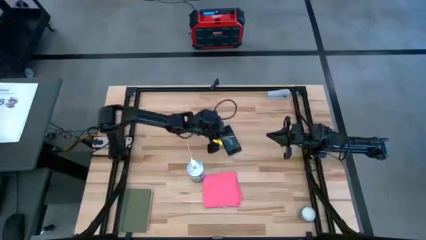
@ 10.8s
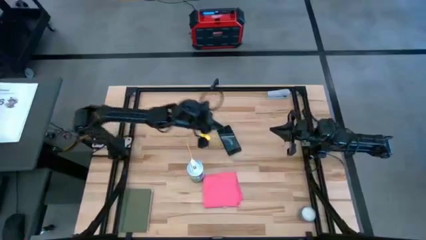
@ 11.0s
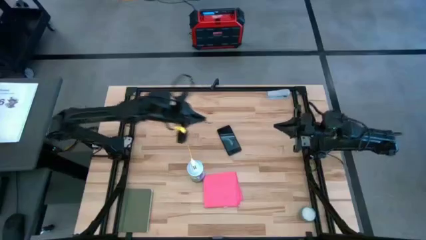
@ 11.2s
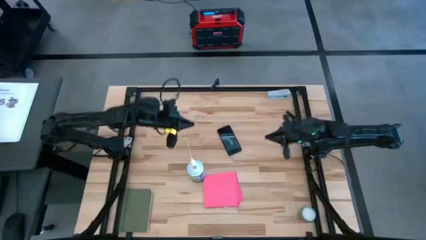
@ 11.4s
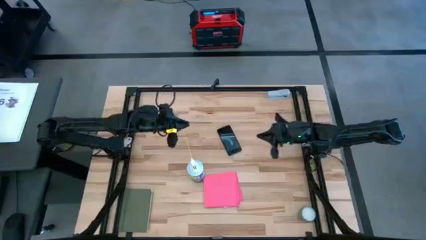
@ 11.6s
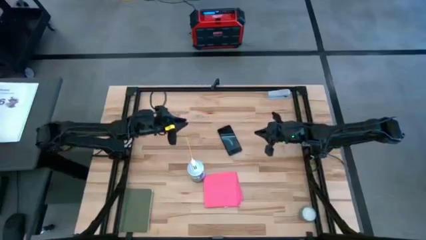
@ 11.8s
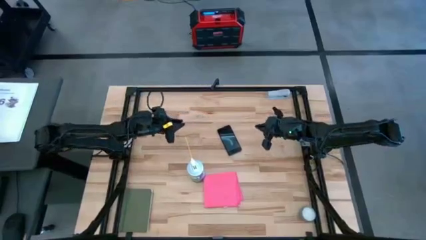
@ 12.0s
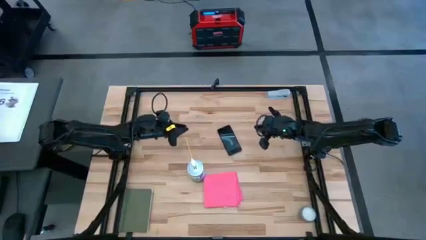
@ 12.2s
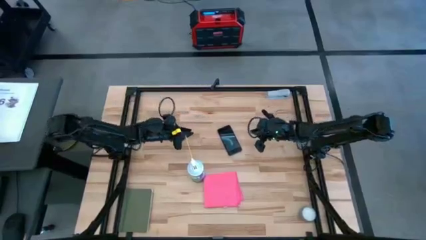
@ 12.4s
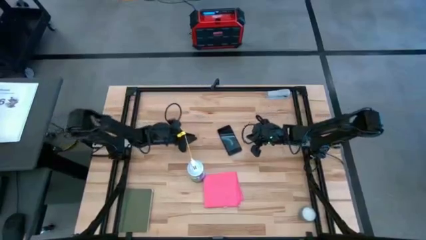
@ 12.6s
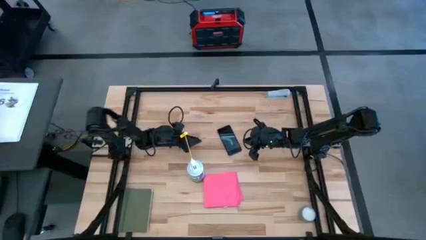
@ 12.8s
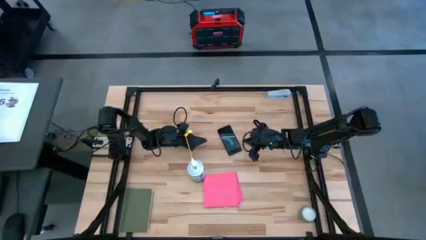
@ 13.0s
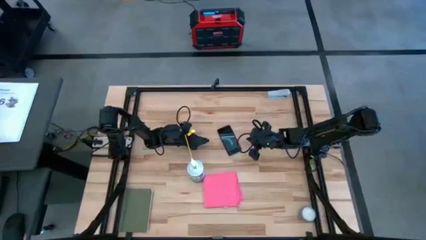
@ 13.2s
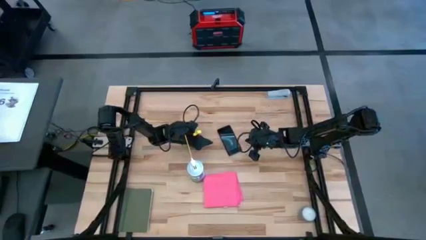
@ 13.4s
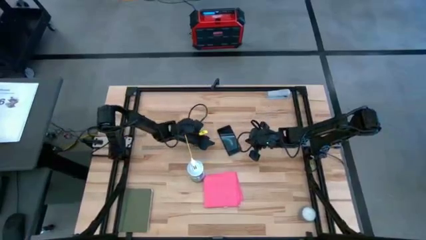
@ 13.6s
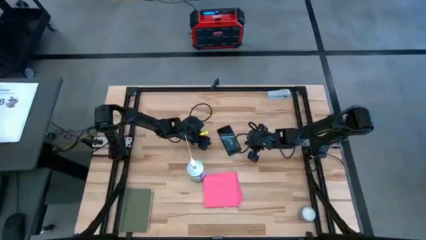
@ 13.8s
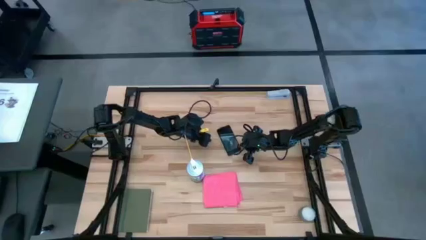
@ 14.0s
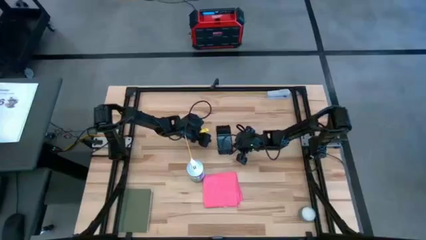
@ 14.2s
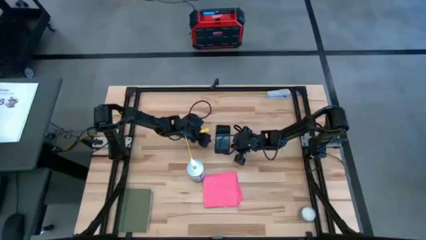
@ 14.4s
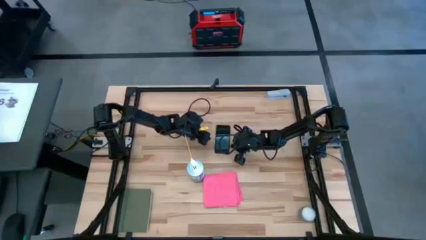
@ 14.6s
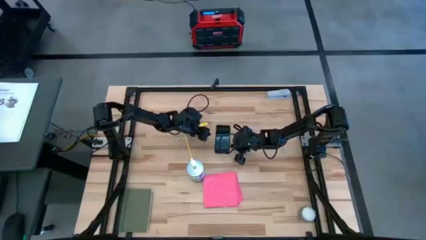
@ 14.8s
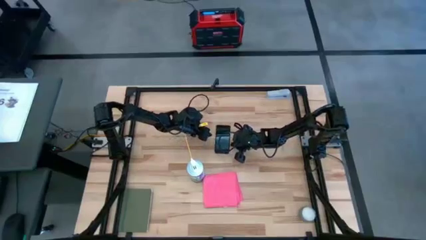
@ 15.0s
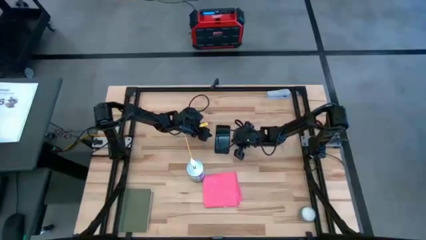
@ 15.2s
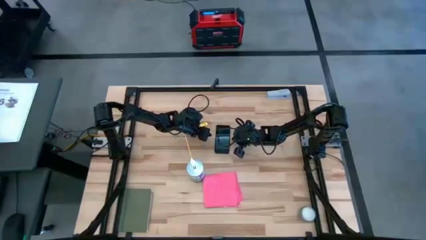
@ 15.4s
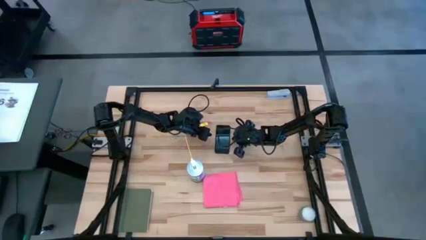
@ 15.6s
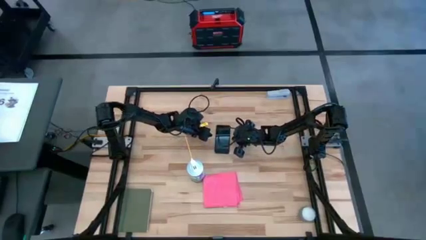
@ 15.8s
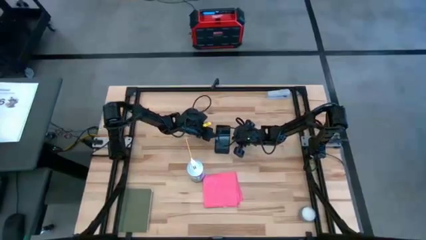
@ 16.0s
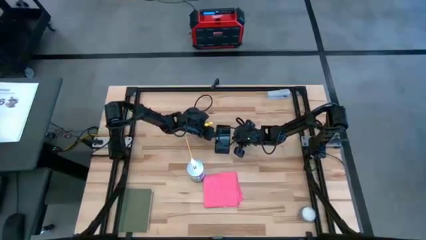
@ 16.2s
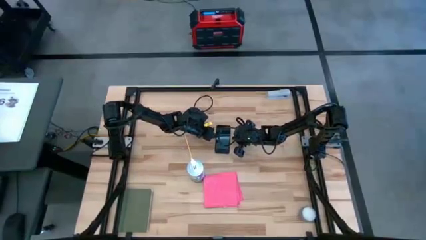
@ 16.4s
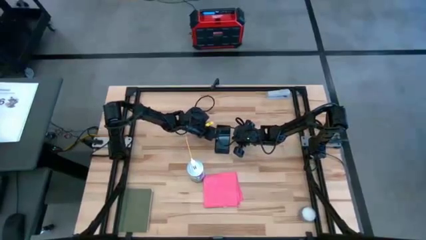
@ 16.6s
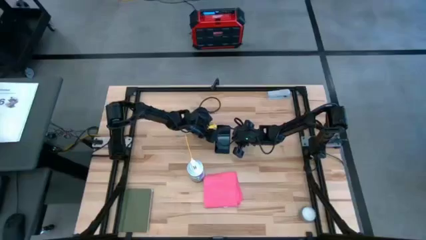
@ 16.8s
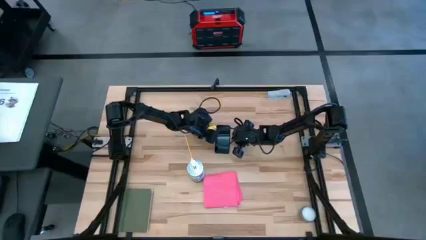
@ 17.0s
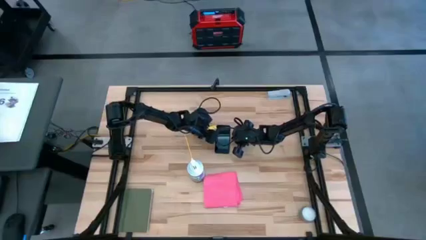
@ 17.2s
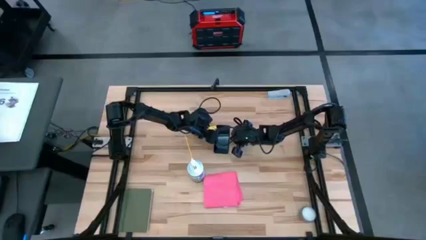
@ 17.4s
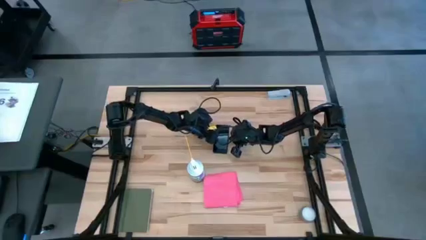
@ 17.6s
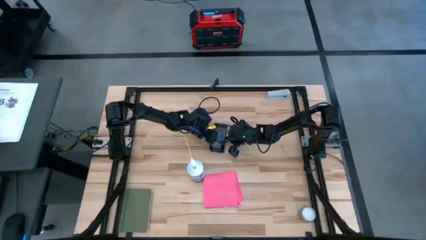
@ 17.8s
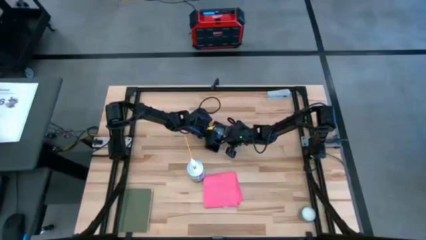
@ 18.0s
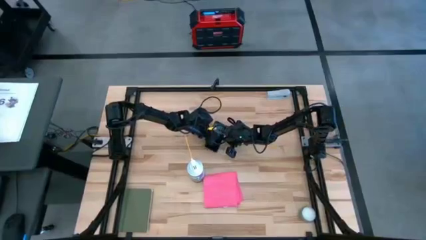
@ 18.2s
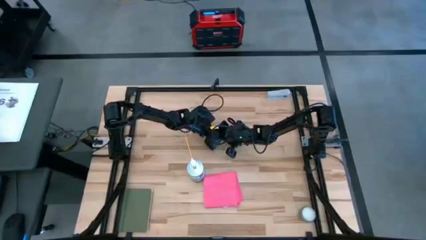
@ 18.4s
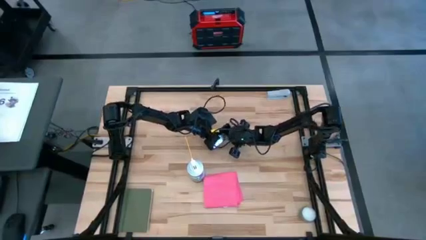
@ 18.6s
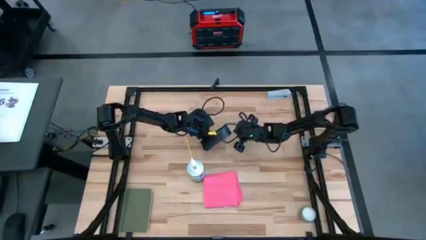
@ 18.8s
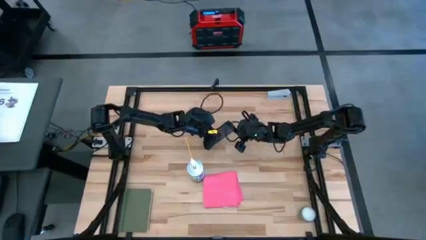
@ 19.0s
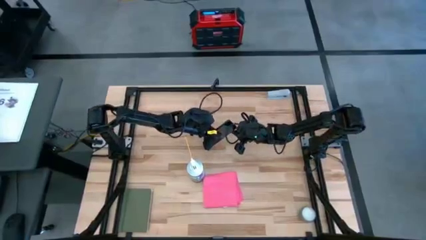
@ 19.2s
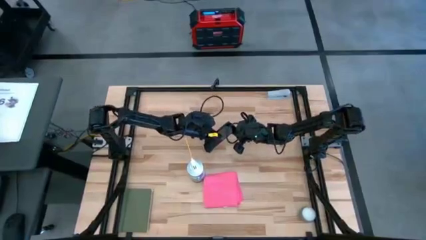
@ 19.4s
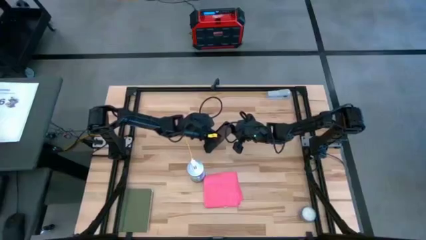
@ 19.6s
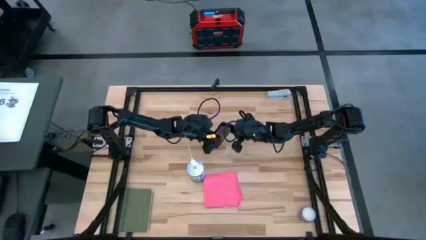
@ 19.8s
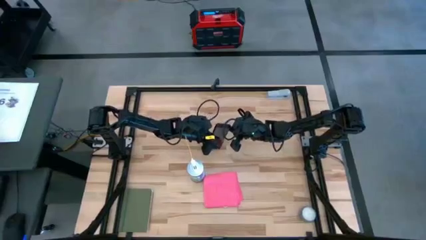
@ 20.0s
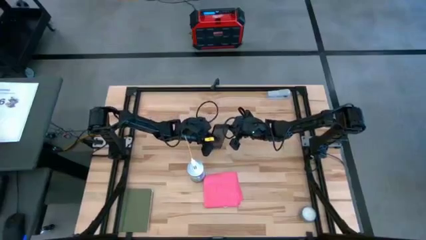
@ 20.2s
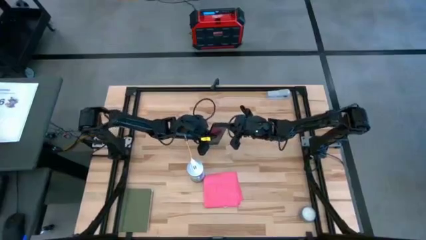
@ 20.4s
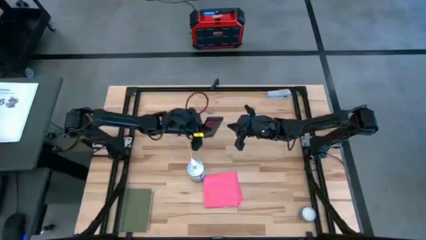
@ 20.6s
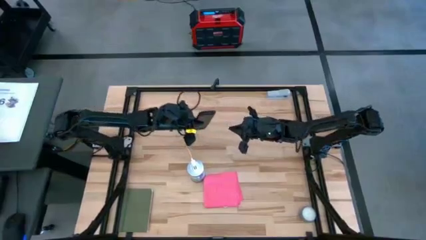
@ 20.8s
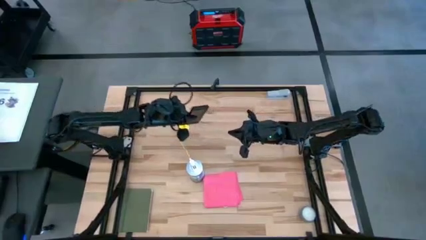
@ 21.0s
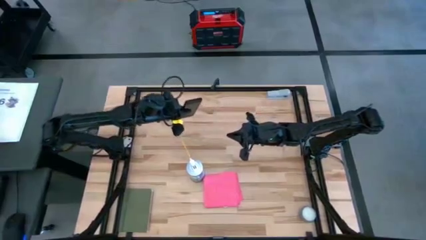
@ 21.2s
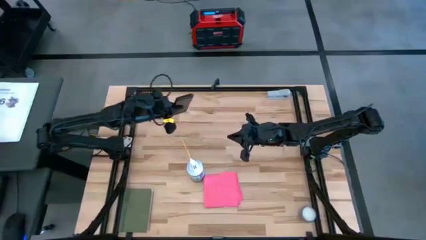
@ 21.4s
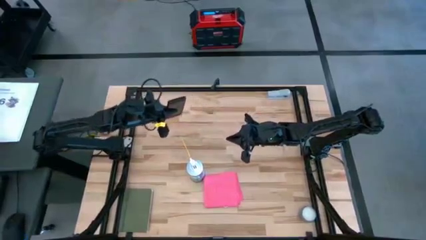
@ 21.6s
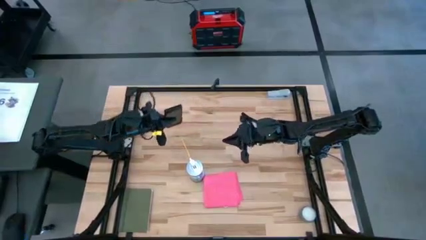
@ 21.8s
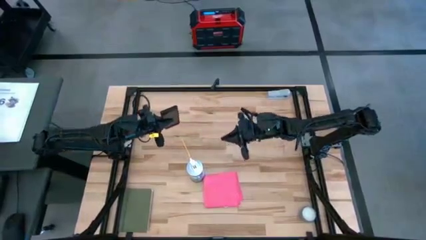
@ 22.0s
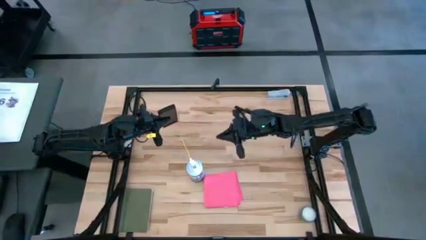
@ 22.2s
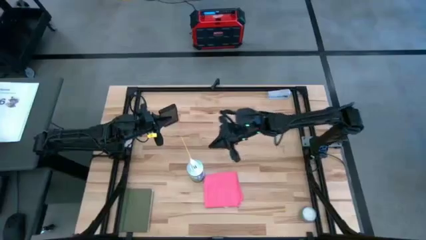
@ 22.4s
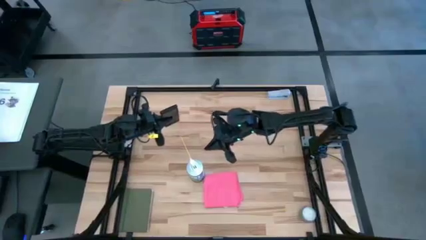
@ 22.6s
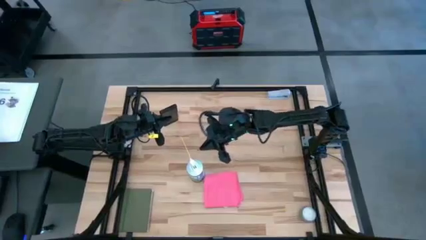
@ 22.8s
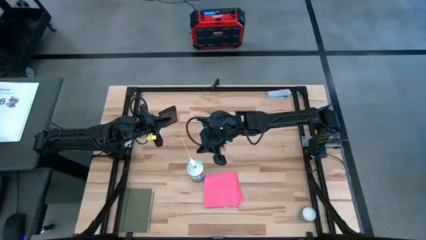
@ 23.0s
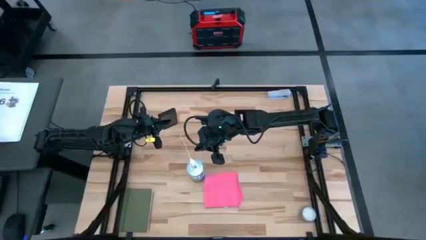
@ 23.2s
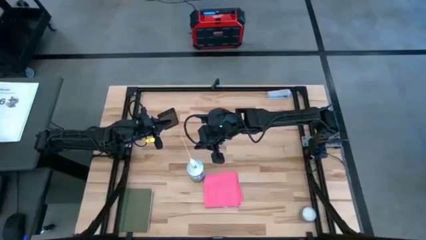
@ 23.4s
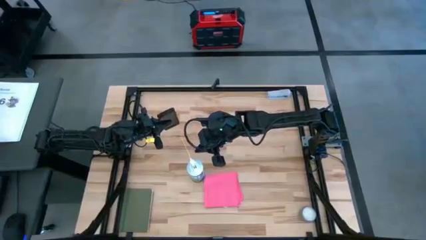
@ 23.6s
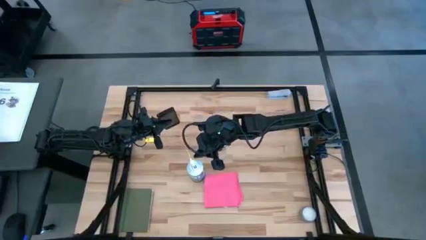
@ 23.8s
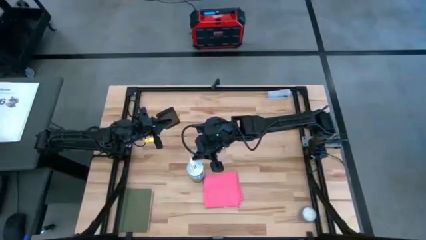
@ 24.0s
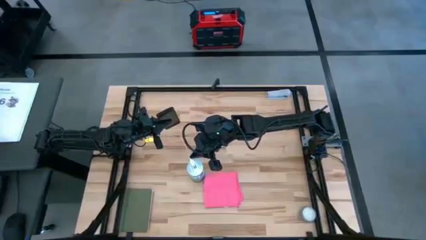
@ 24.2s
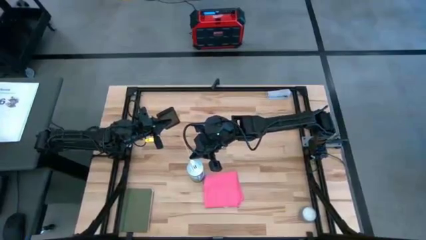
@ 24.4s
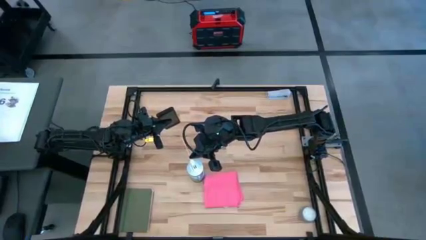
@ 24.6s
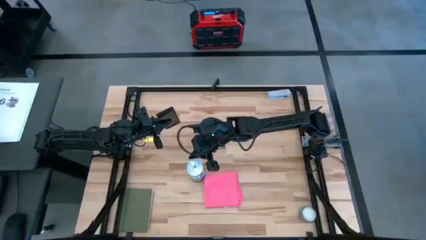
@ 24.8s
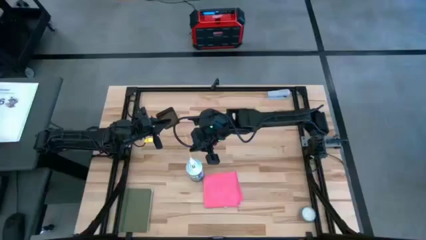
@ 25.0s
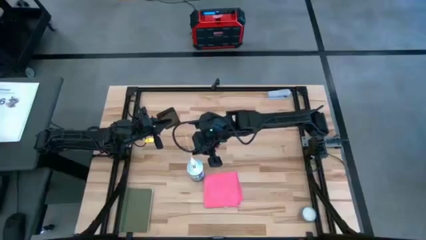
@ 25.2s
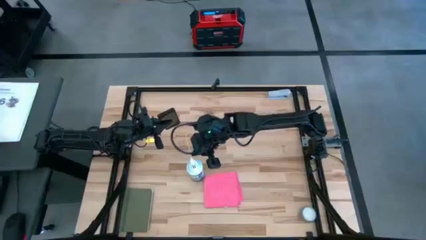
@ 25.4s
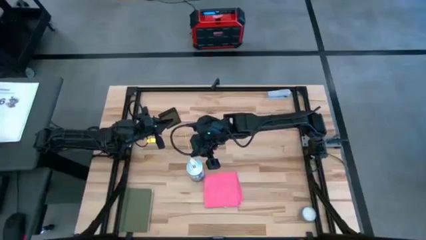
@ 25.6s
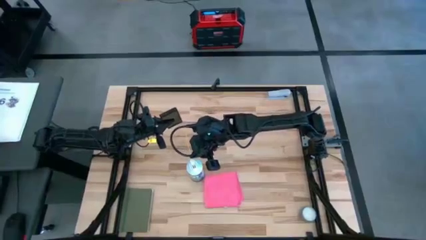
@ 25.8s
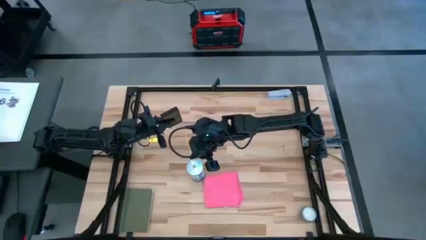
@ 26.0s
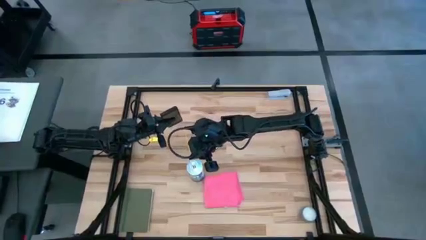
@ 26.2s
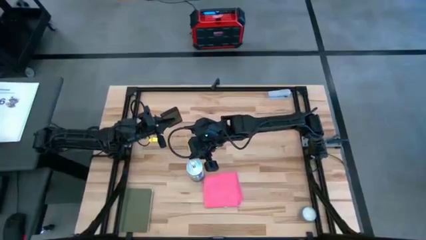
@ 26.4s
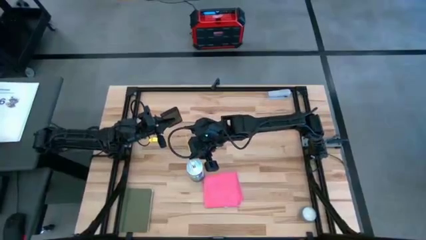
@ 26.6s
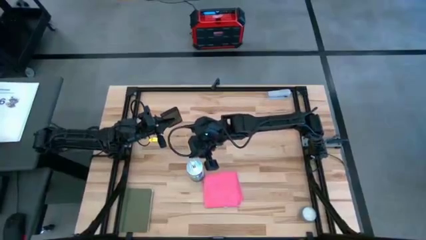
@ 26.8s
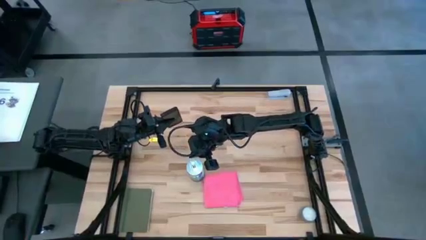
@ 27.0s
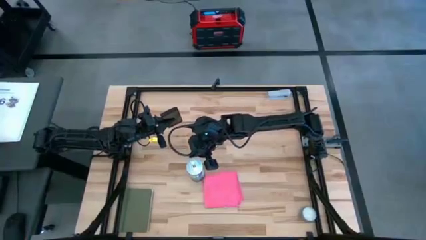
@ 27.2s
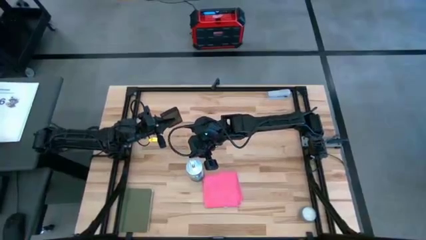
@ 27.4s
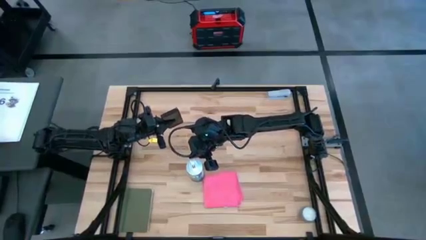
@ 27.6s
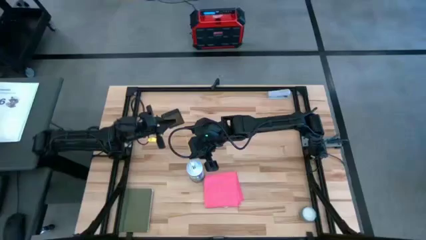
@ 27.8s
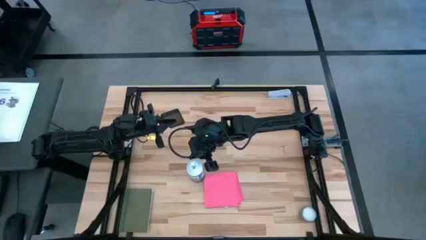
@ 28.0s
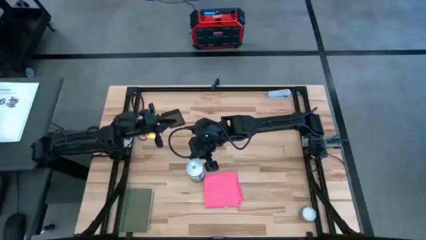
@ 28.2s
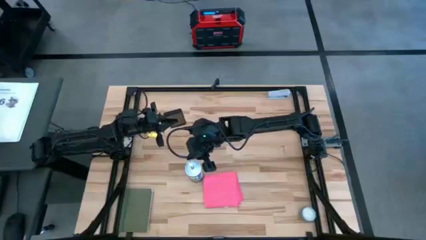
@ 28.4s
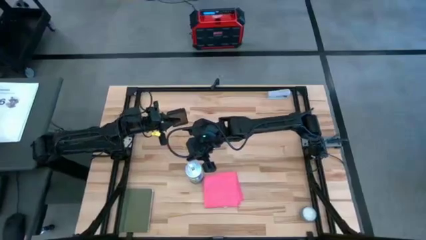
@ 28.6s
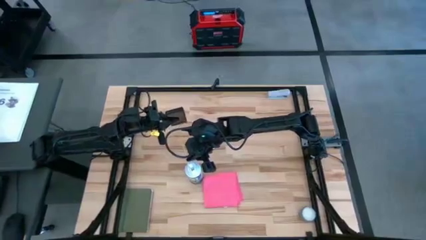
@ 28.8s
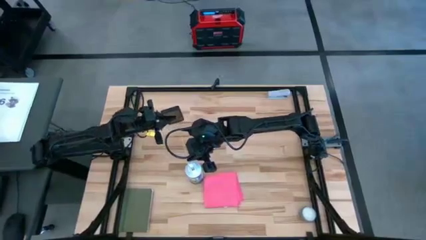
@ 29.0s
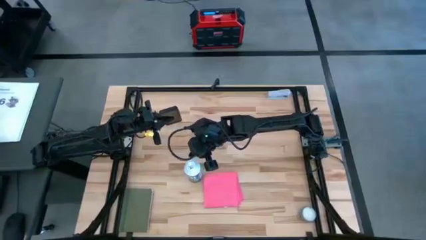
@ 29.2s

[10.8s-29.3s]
Task: Apply microfiber cloth
Spray the front of the cellphone with the white spray bottle
